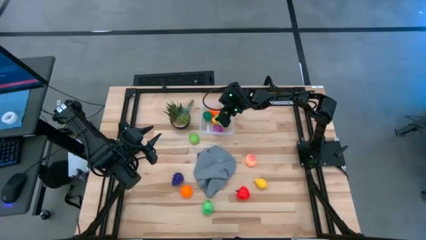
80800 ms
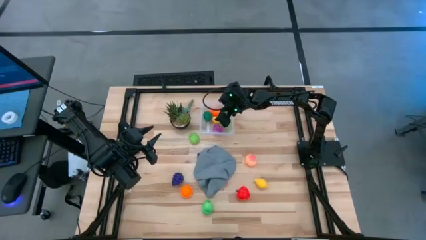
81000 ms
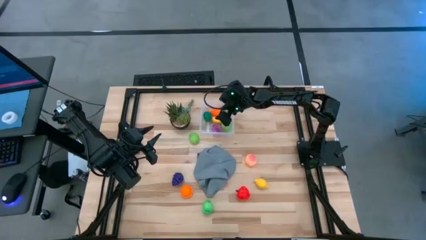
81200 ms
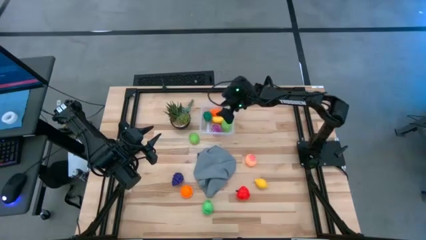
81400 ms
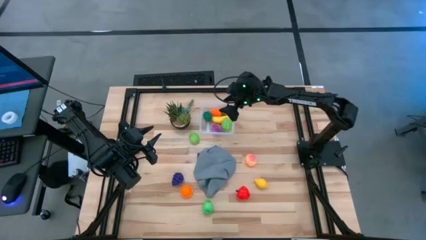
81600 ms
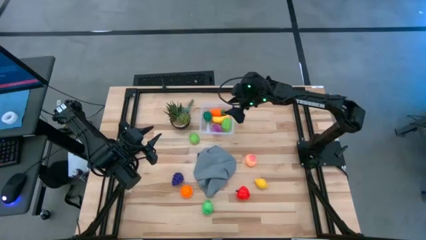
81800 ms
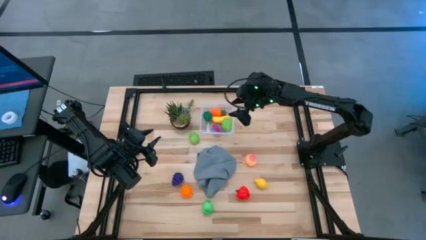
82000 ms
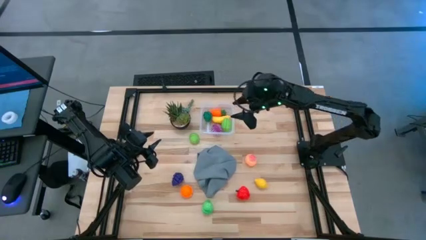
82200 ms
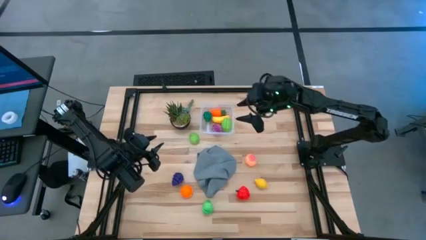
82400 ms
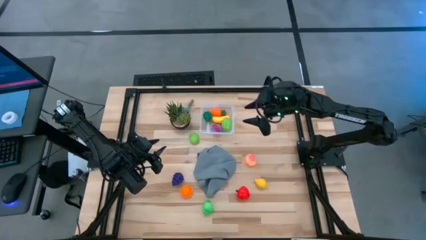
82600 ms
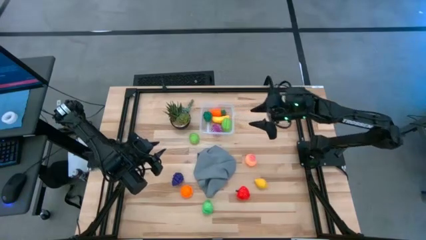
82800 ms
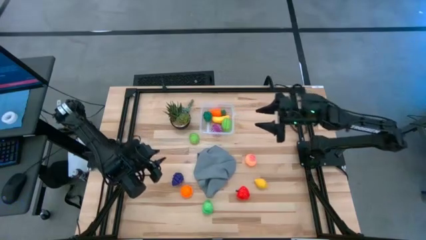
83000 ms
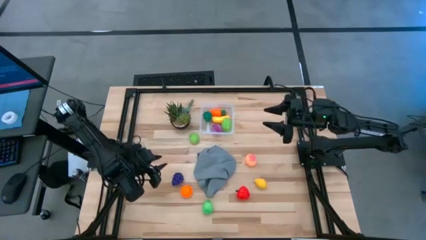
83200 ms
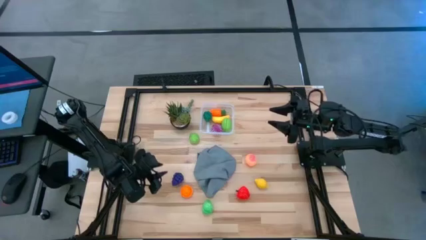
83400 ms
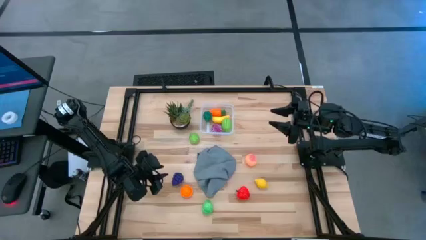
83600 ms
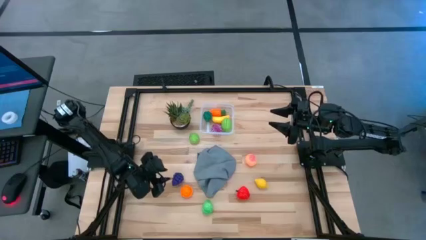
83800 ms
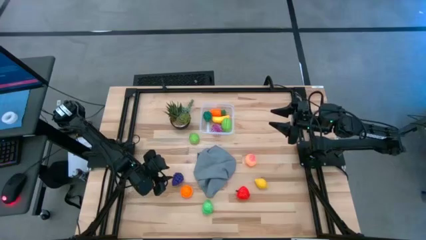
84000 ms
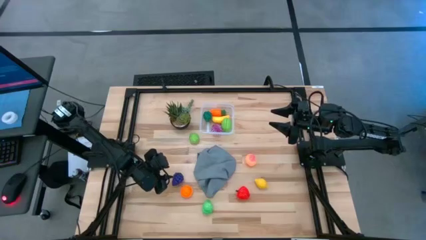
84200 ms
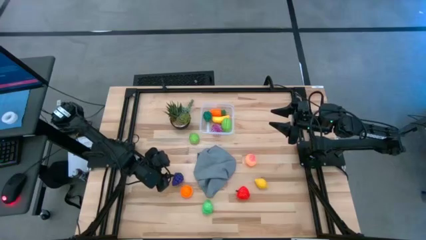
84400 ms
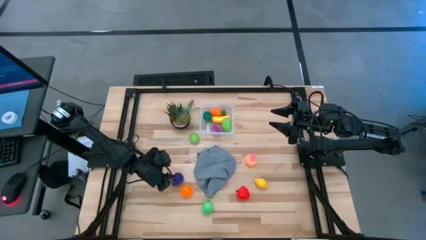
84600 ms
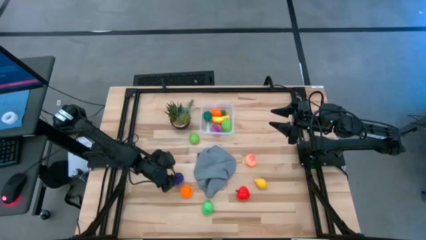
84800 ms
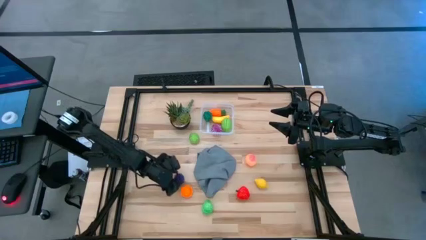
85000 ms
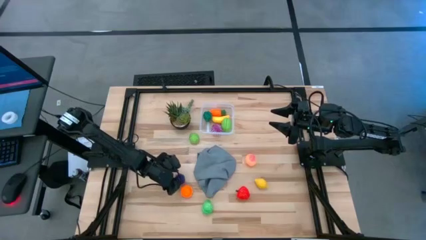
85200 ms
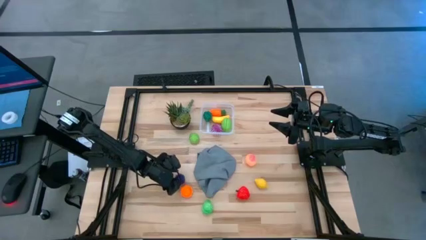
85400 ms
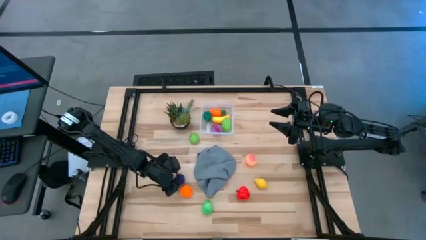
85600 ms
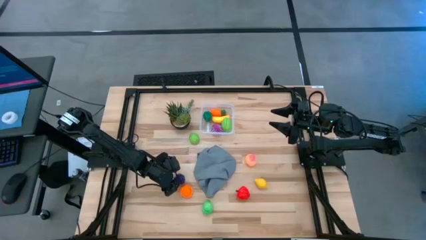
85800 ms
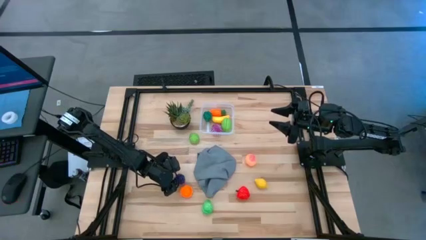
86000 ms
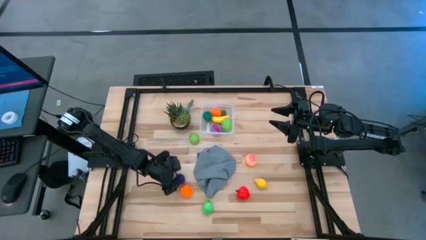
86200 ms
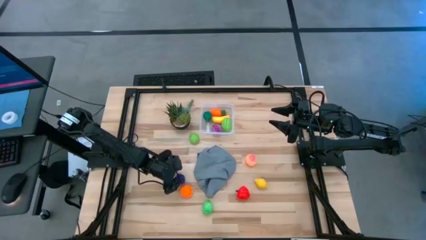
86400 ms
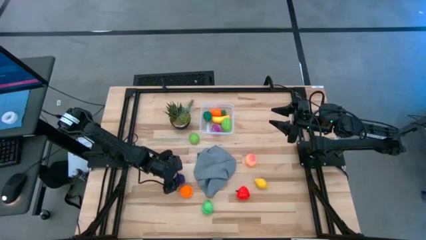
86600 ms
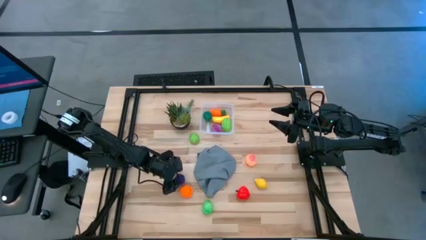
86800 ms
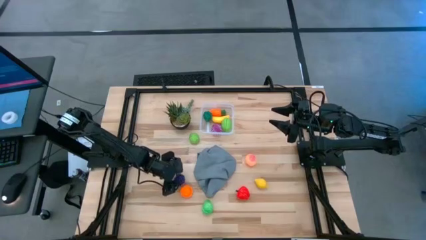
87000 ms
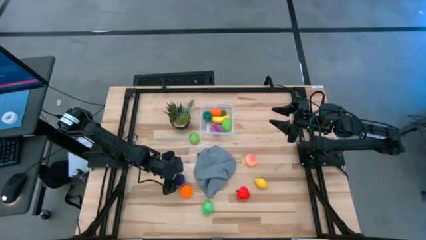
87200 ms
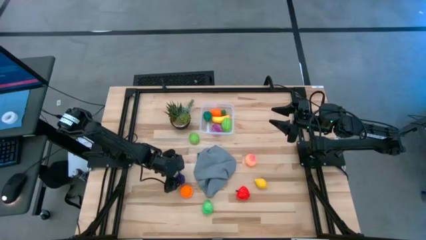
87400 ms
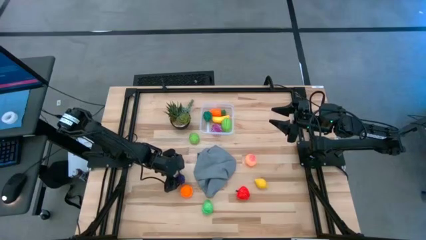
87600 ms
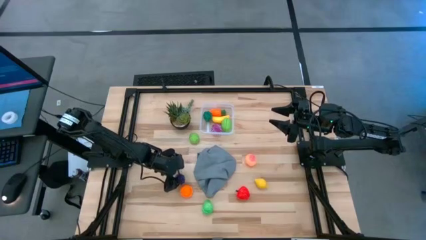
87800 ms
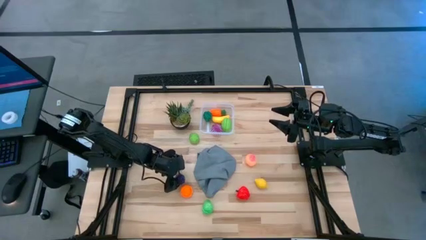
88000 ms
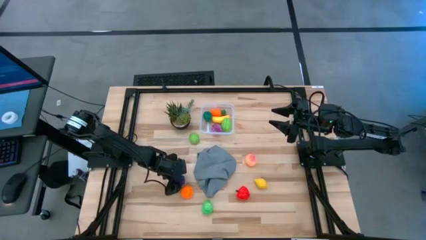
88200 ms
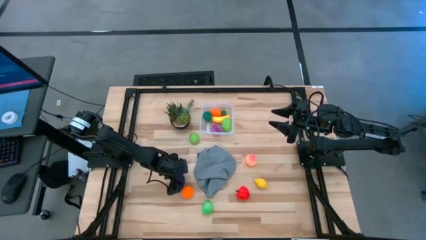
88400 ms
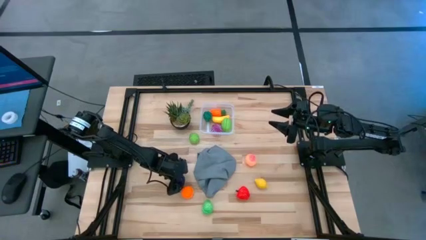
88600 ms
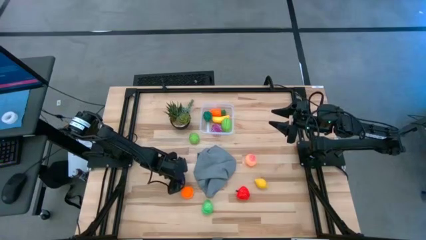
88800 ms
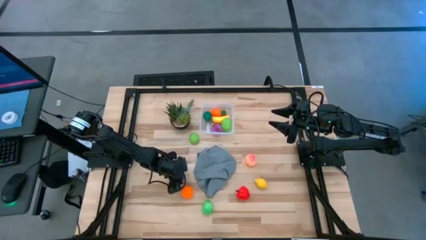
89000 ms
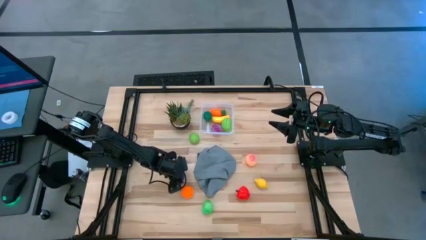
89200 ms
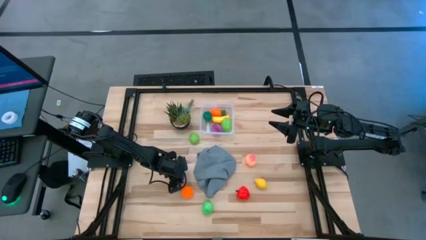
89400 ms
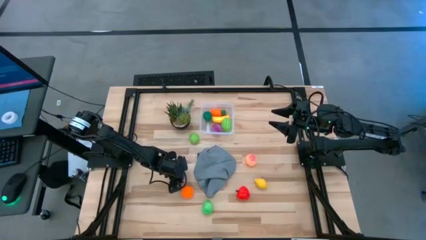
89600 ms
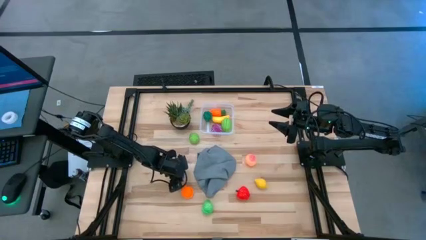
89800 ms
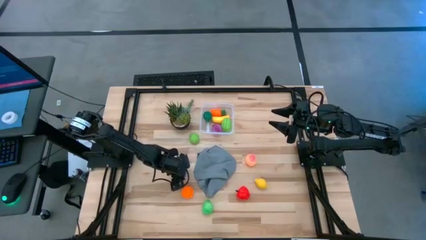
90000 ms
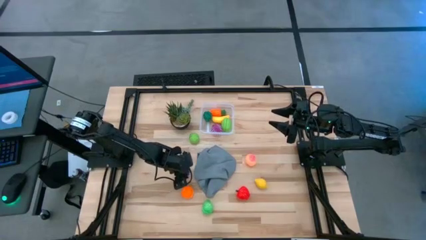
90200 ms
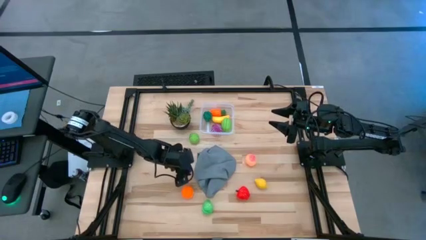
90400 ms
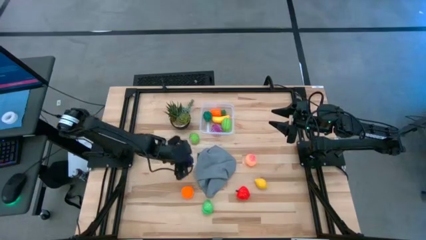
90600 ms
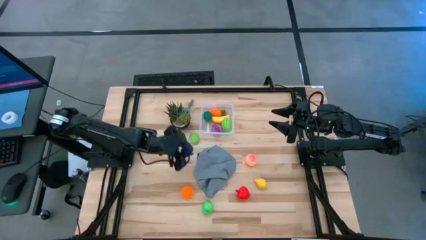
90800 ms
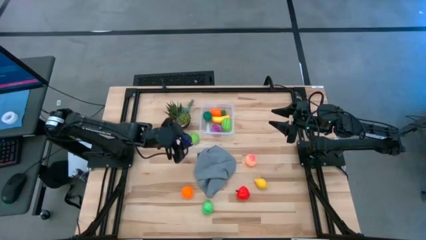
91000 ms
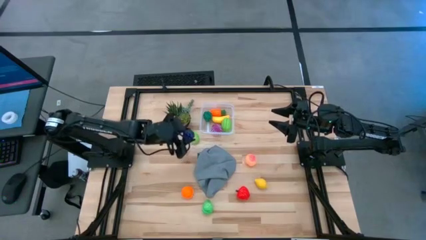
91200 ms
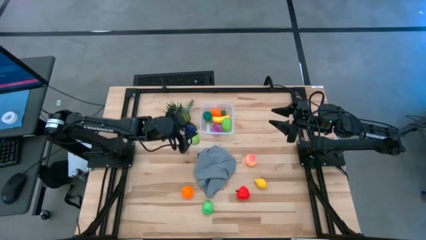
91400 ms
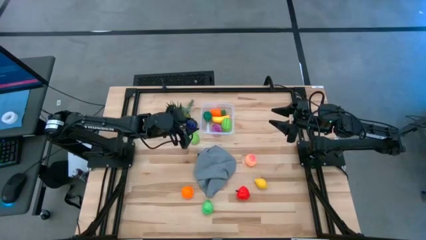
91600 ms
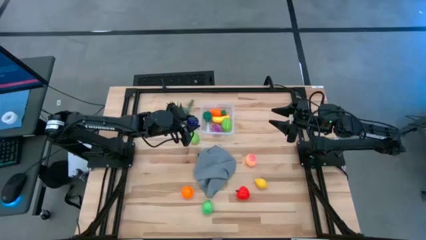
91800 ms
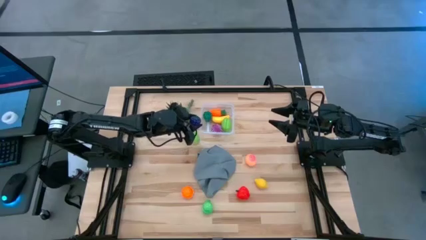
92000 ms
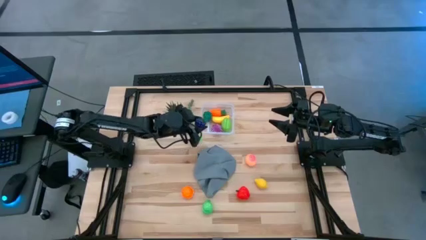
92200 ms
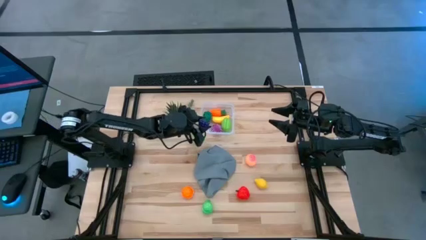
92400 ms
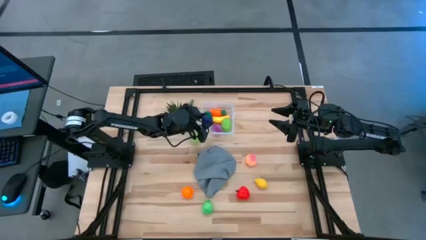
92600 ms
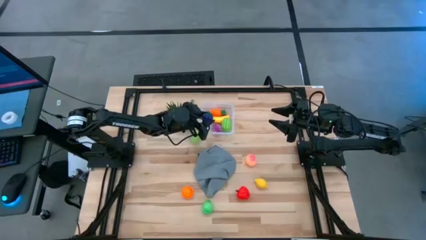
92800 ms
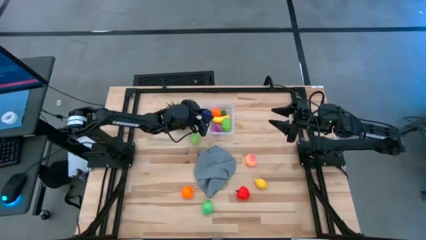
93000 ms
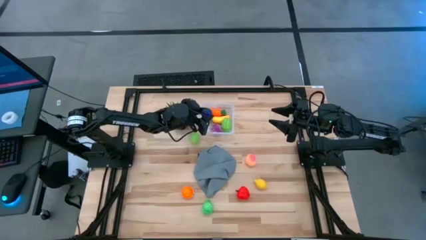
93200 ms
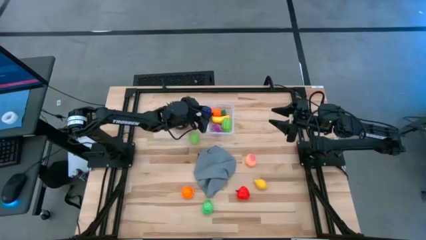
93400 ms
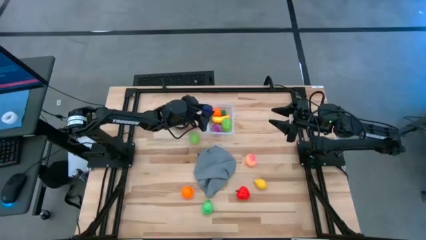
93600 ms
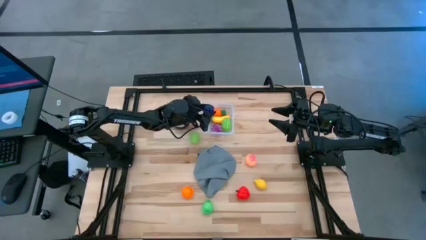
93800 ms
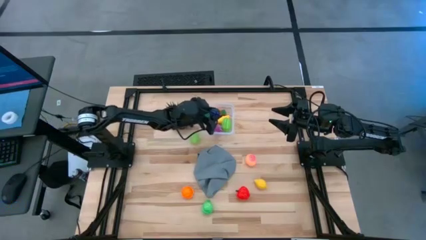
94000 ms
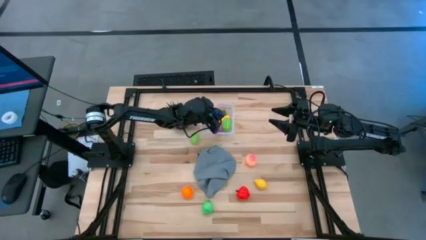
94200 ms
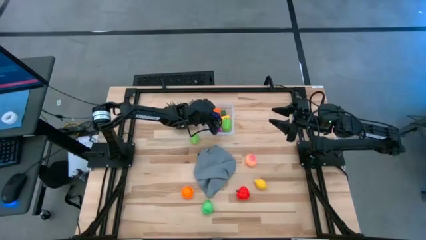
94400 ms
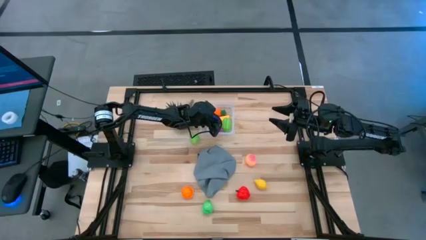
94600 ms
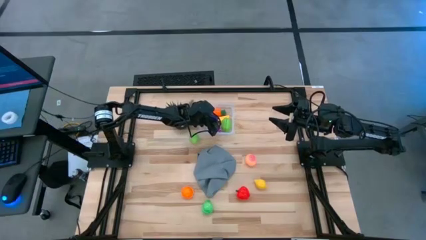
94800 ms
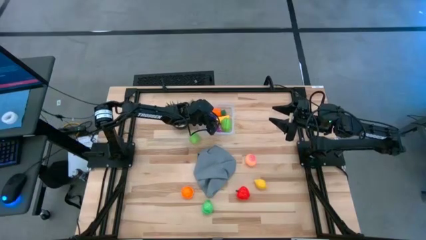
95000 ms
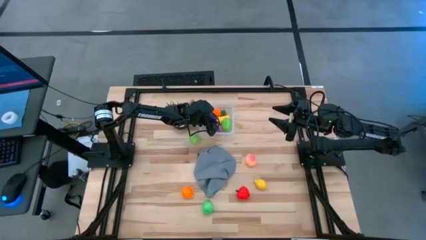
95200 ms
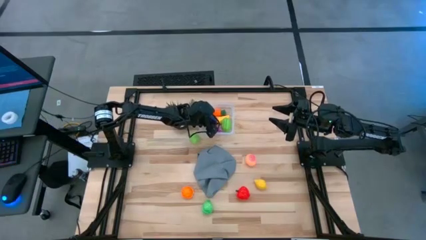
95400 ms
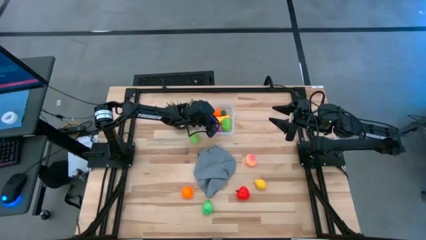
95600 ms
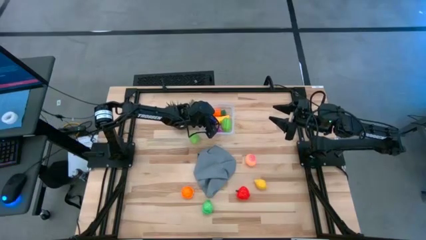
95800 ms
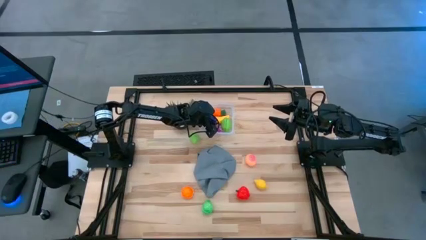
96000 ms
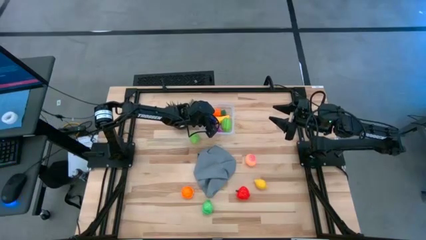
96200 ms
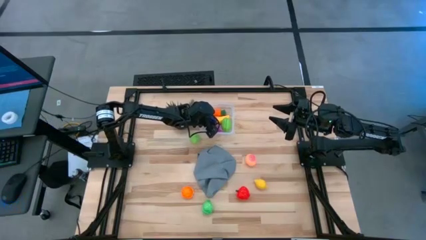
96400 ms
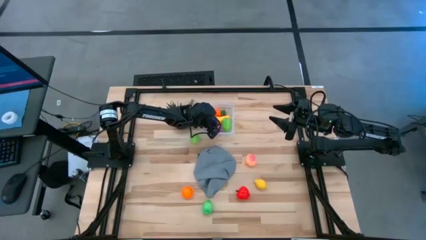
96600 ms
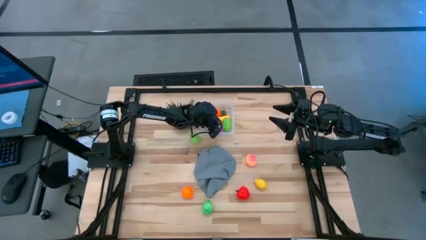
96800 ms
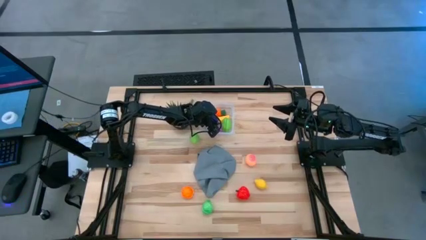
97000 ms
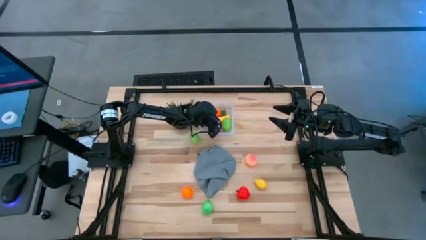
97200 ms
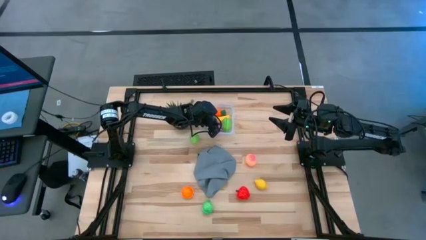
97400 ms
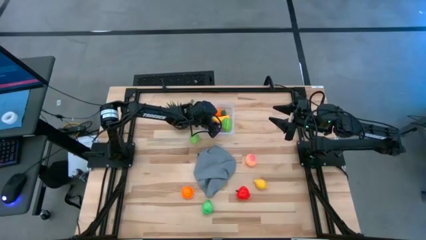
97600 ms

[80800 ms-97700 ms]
Task: Pick and placing Produce into tupperware
Put the violet grapes into the transparent container
